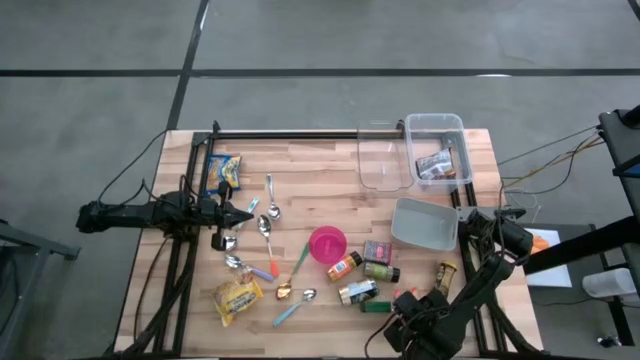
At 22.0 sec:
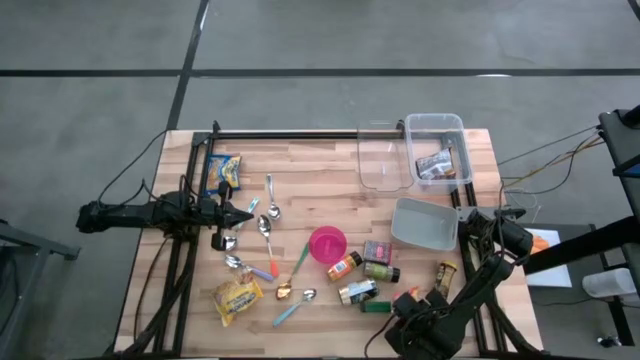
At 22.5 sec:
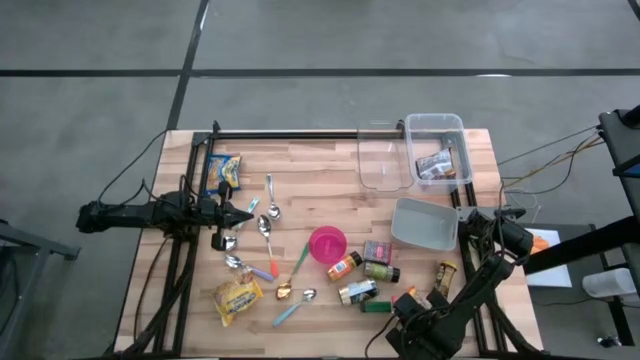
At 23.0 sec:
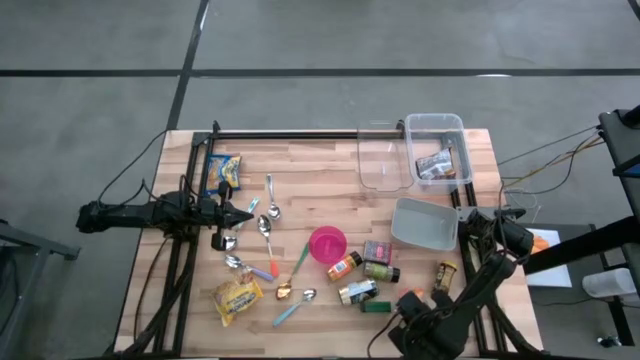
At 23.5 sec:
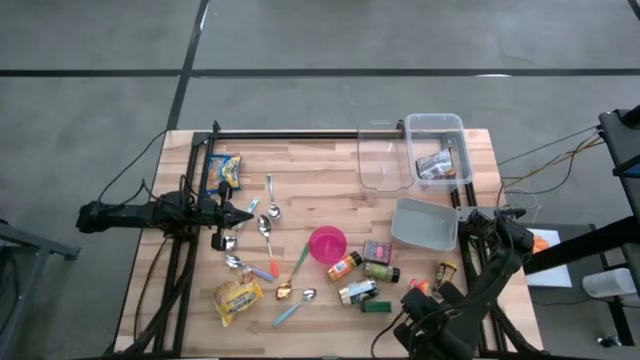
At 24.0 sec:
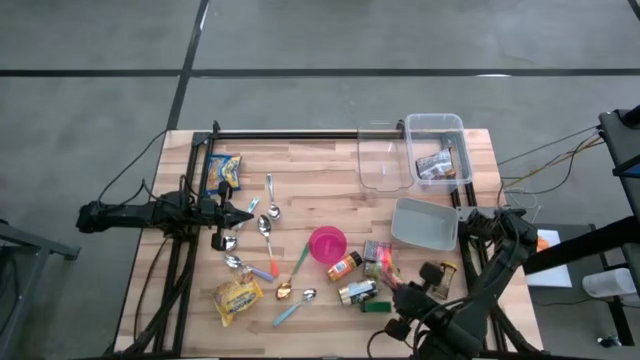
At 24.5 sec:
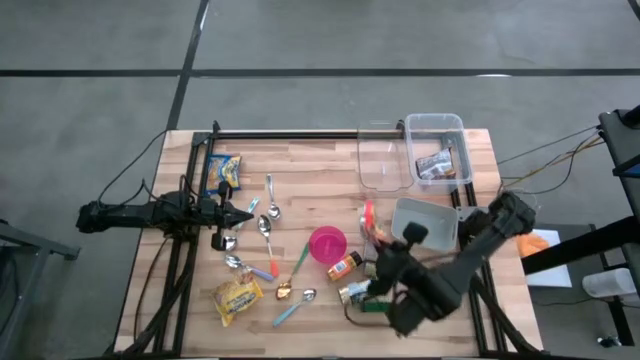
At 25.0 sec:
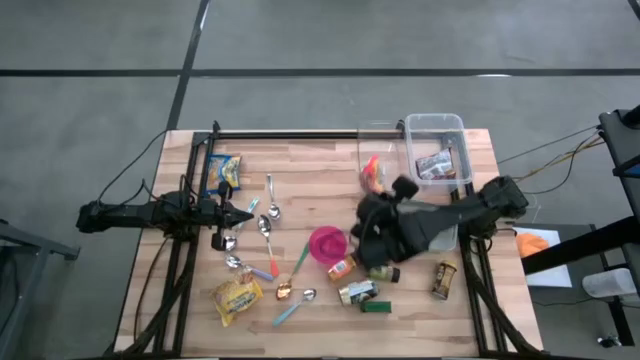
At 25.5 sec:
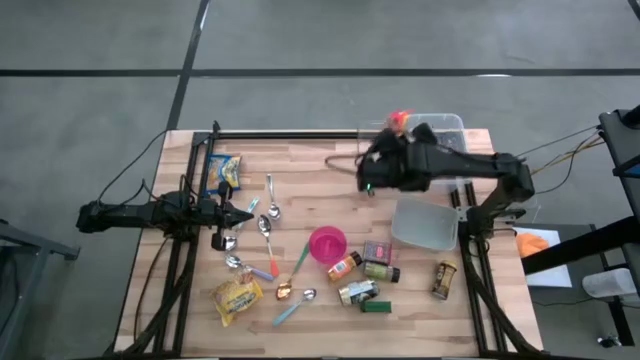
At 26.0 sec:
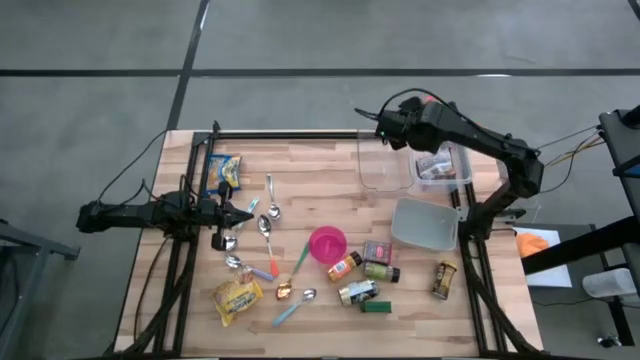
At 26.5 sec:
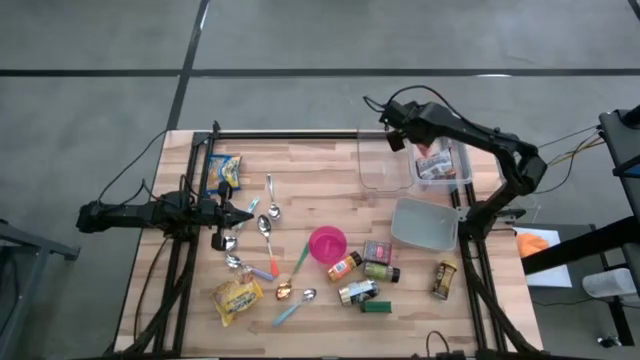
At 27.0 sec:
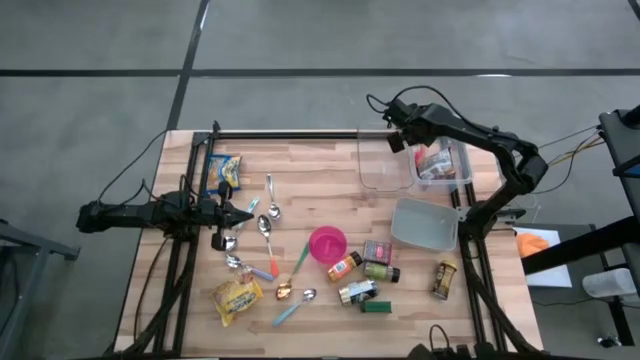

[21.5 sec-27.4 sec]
Put the orange noodle pack into the white bin

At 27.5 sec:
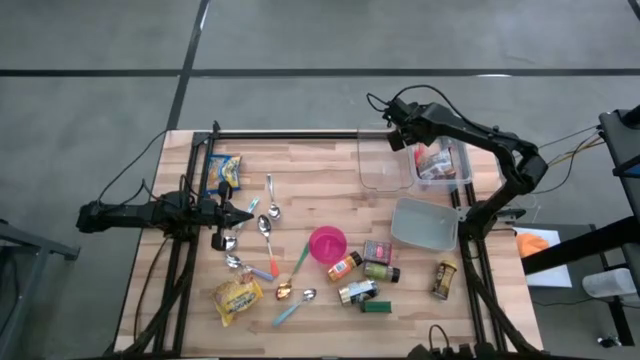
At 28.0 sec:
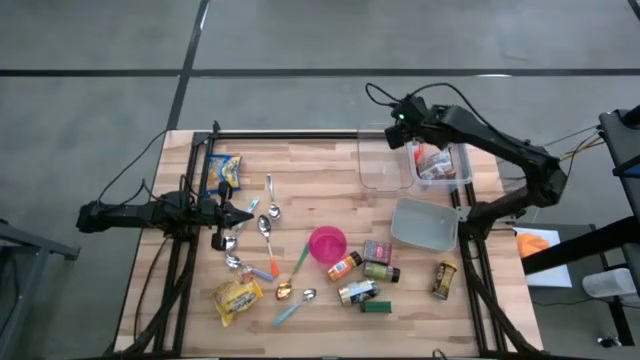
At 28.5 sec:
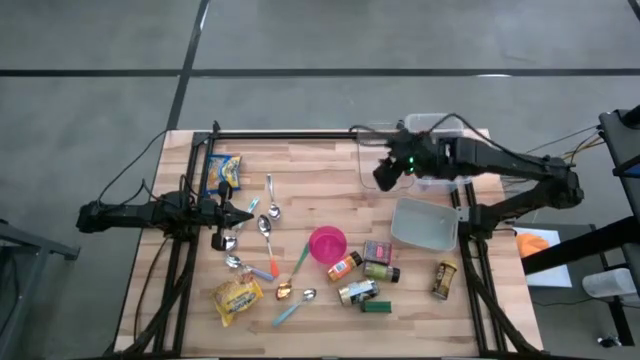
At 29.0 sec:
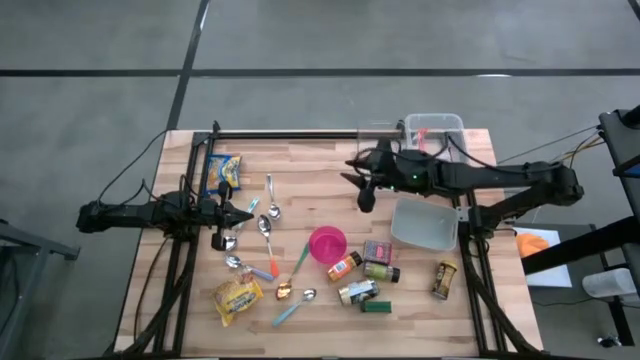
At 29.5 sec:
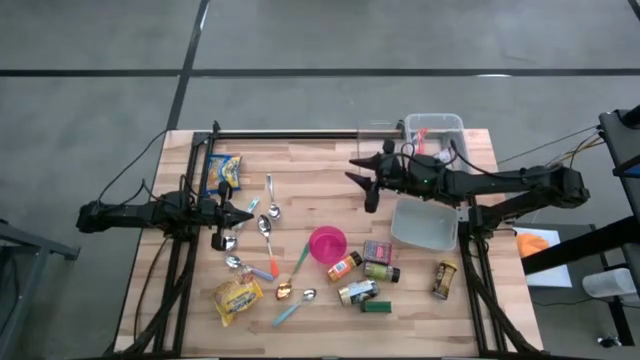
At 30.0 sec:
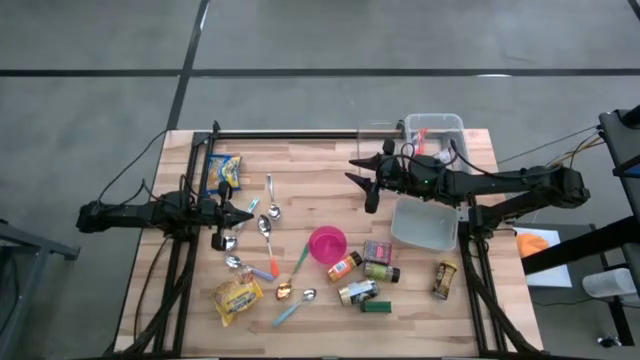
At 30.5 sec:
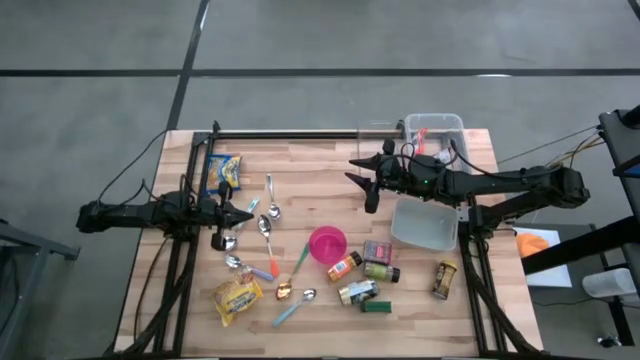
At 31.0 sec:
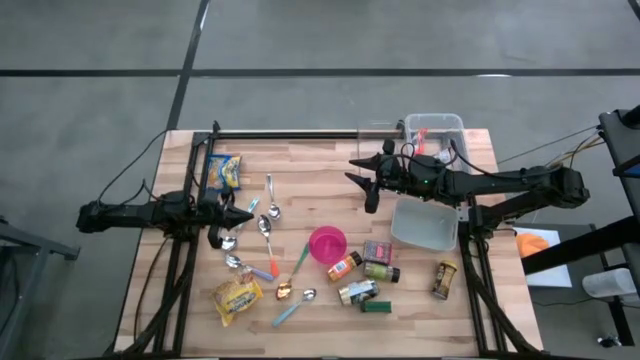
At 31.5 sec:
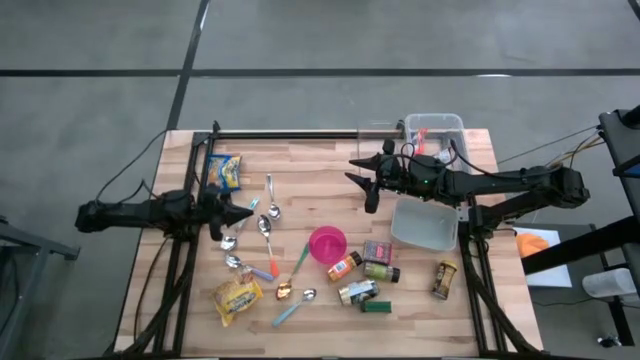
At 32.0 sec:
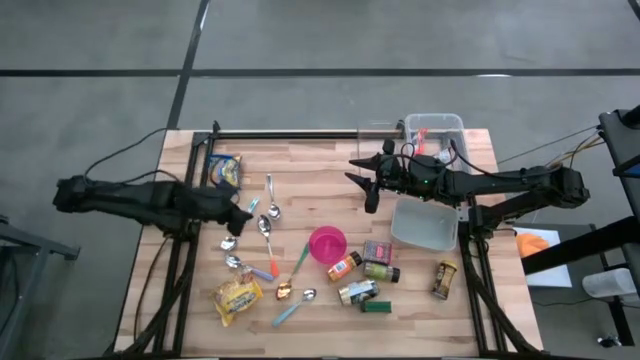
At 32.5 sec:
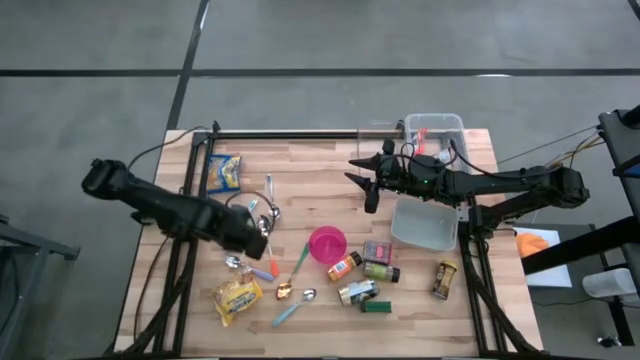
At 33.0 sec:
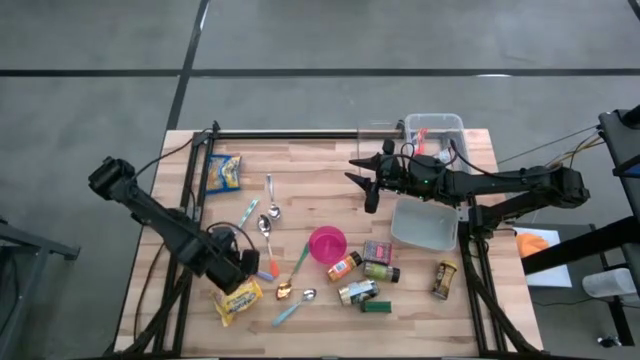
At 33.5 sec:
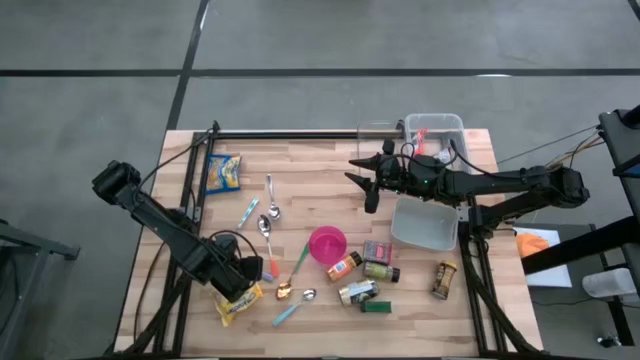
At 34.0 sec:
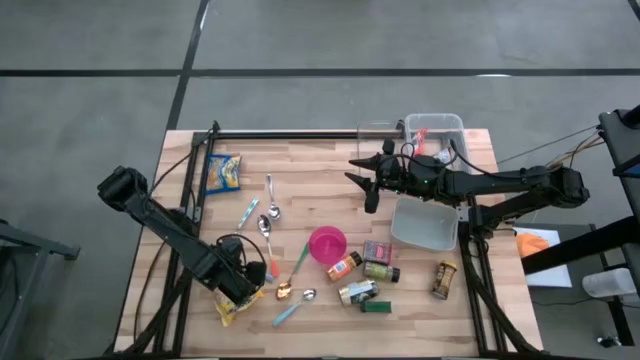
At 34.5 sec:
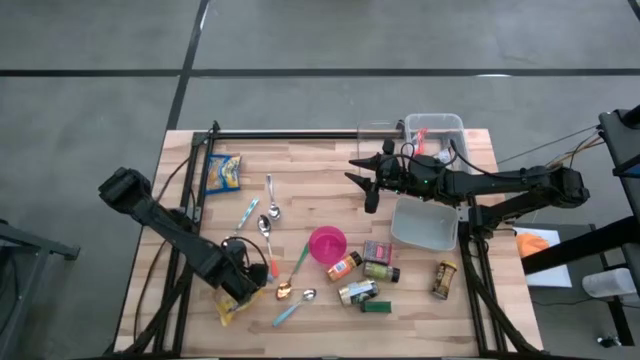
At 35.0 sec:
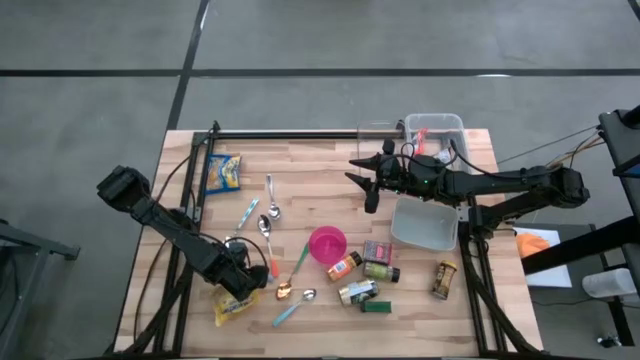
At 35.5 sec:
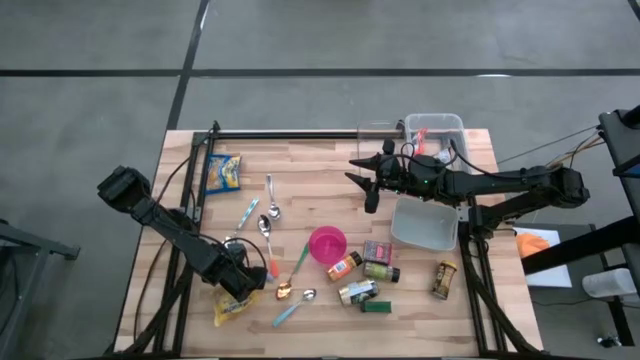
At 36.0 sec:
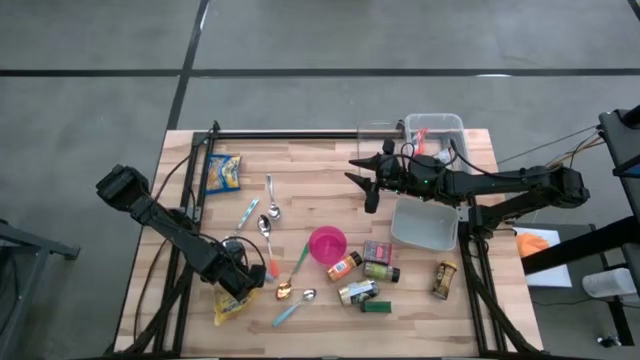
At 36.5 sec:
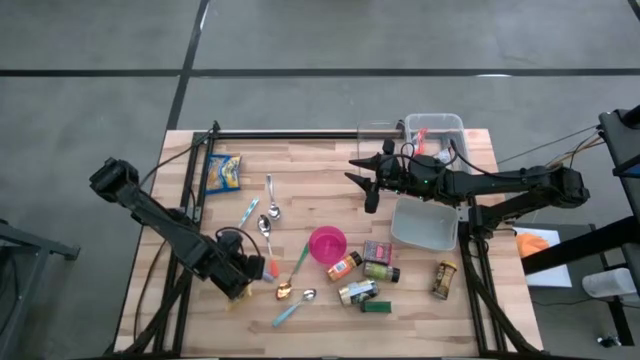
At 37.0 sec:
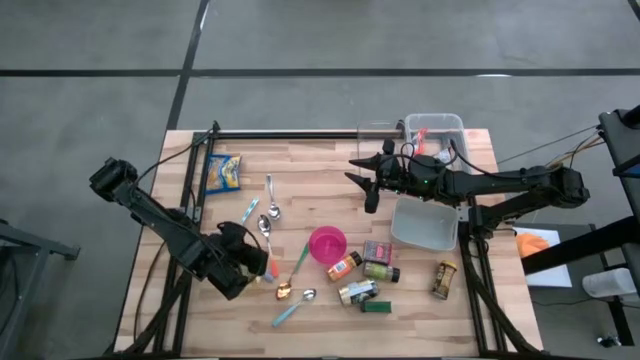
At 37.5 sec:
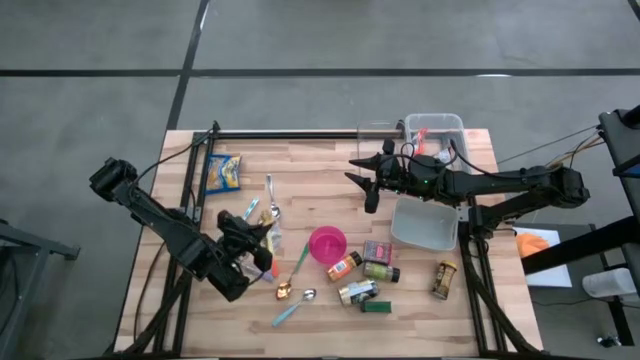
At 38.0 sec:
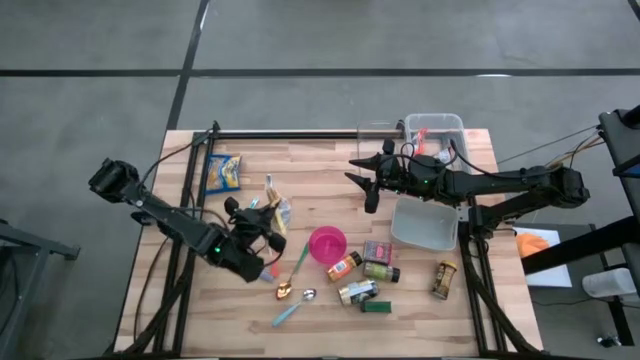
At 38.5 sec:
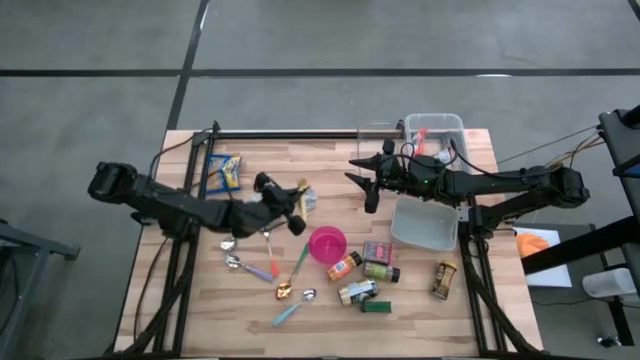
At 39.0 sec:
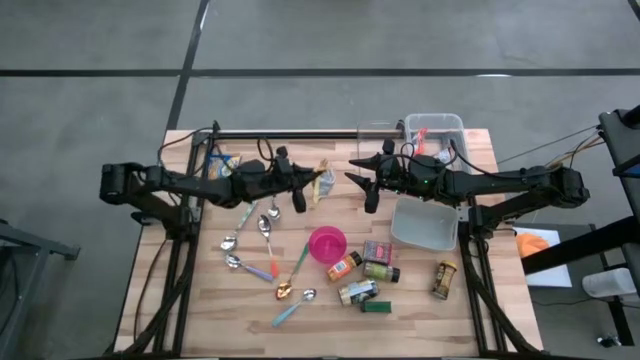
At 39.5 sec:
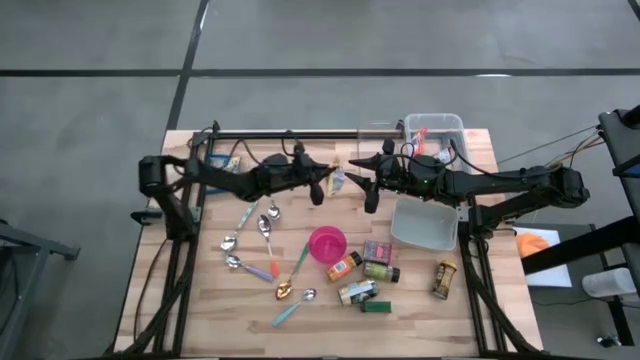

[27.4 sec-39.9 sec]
Put the yellow noodle pack into the white bin
